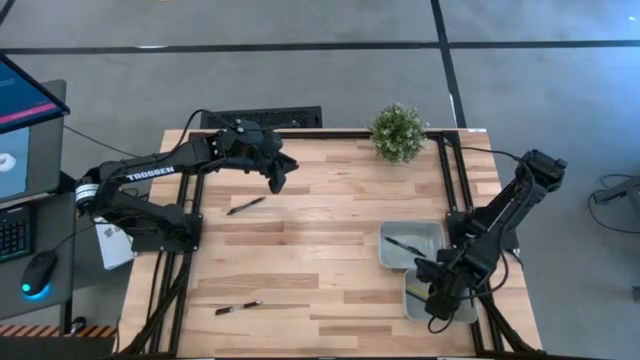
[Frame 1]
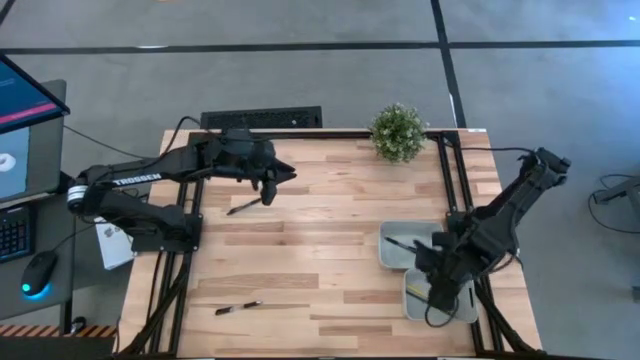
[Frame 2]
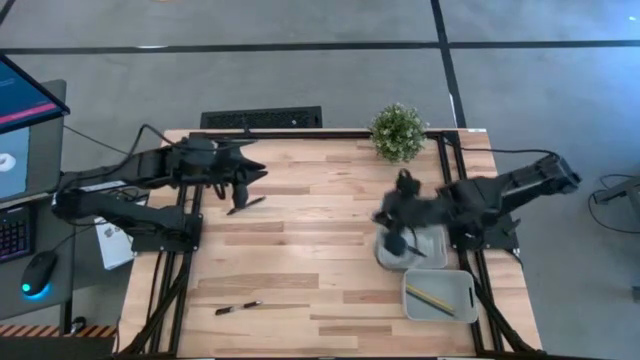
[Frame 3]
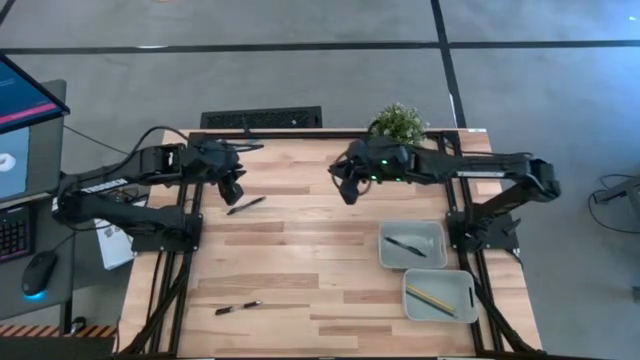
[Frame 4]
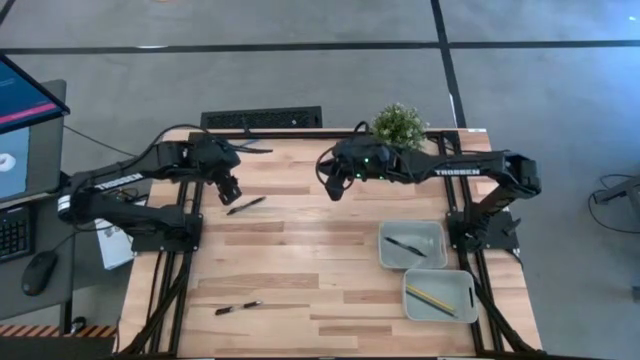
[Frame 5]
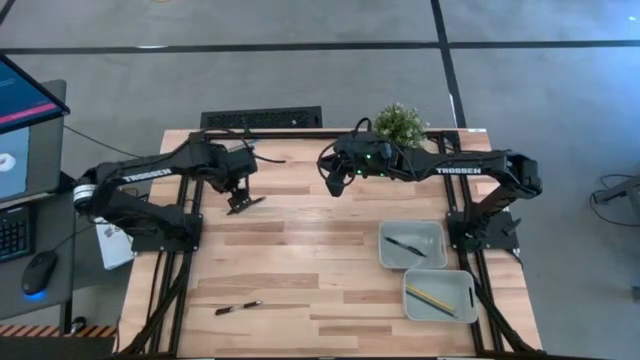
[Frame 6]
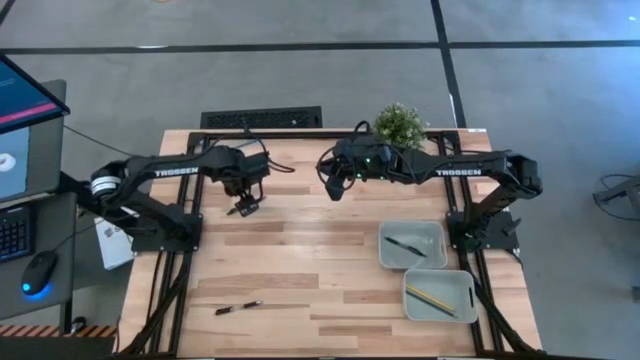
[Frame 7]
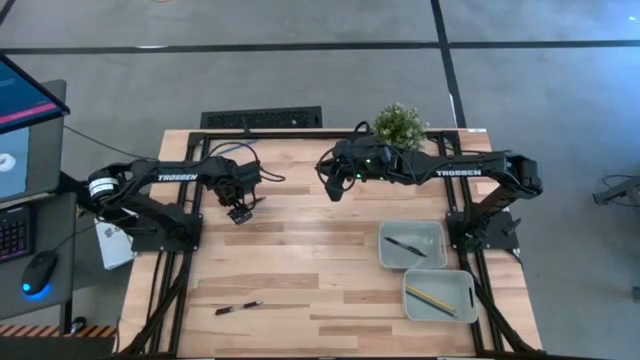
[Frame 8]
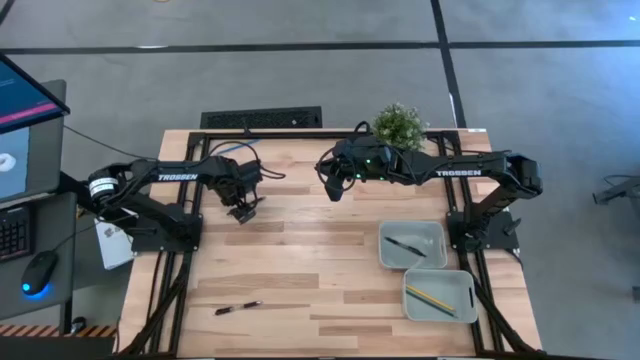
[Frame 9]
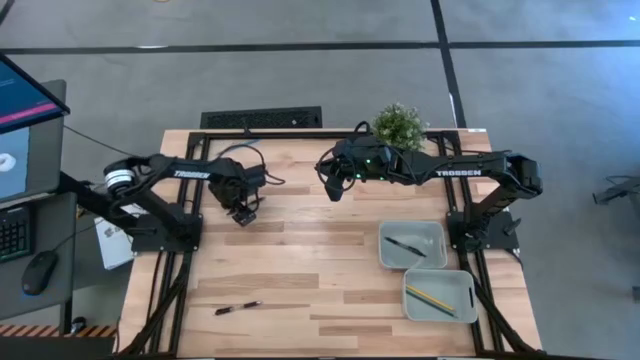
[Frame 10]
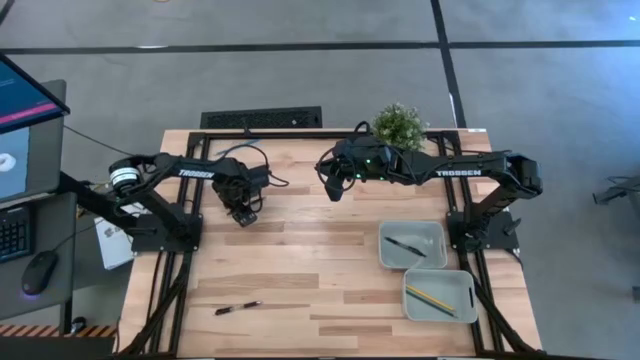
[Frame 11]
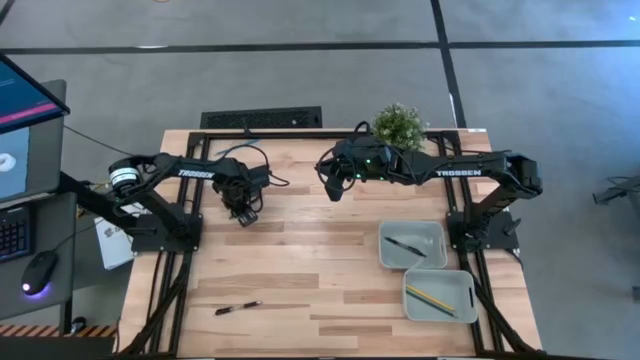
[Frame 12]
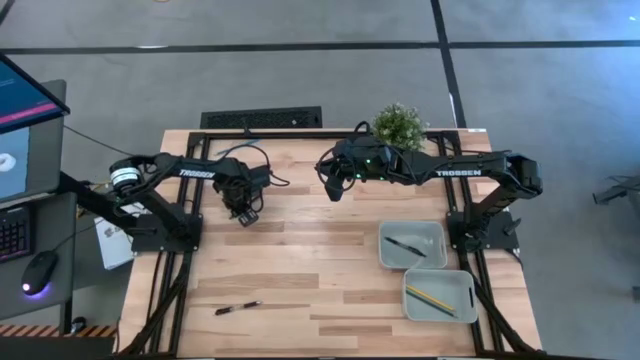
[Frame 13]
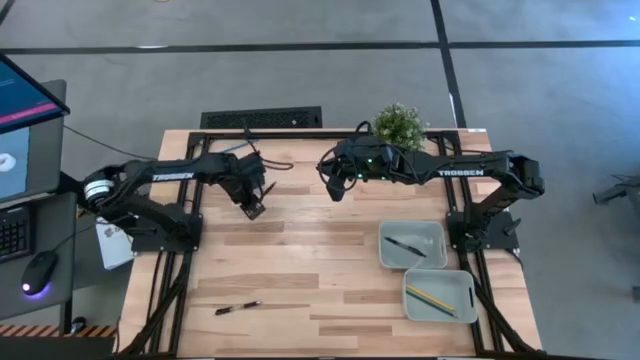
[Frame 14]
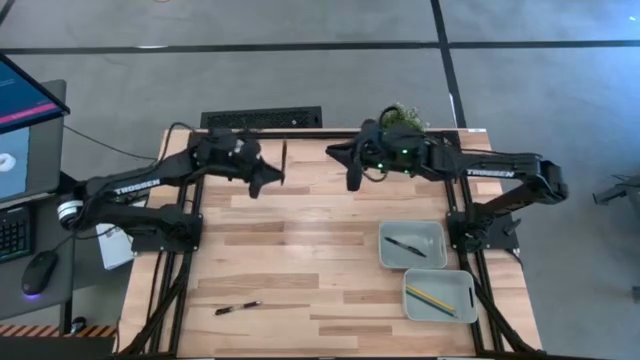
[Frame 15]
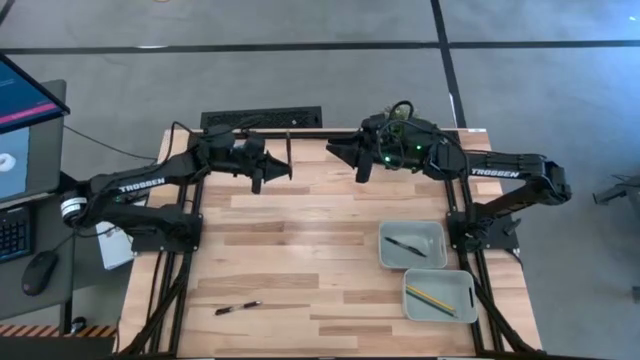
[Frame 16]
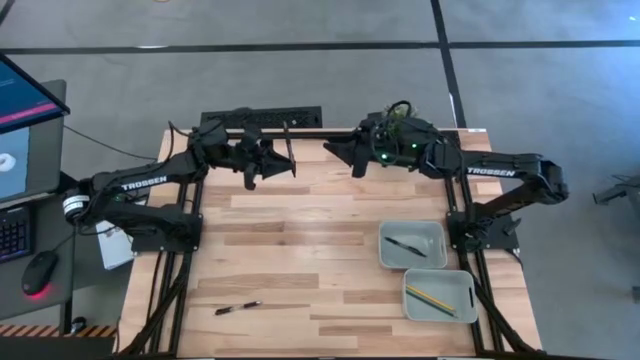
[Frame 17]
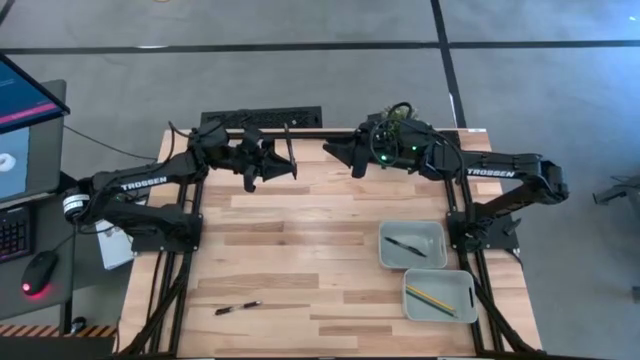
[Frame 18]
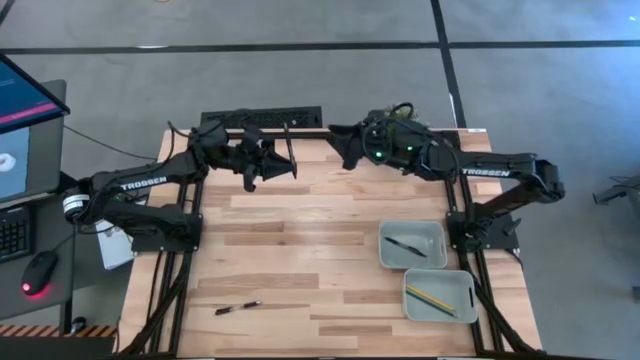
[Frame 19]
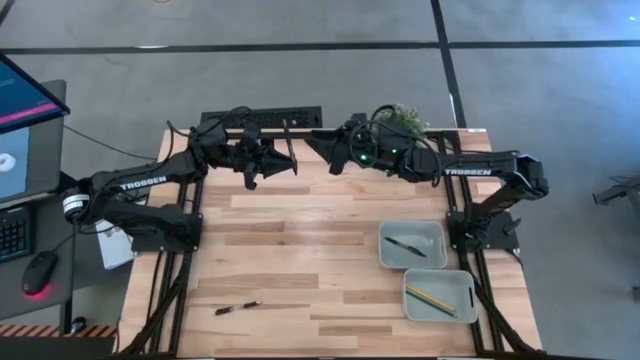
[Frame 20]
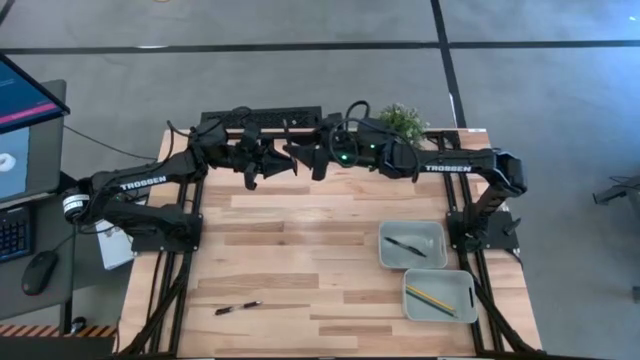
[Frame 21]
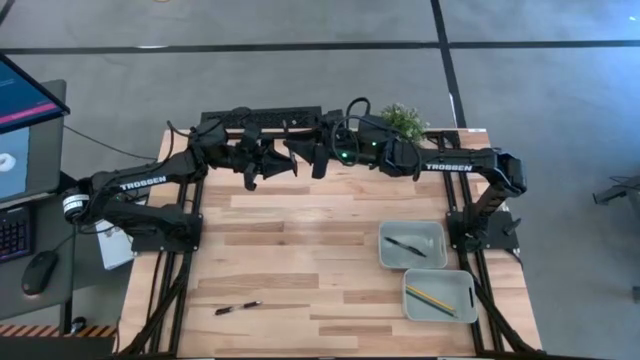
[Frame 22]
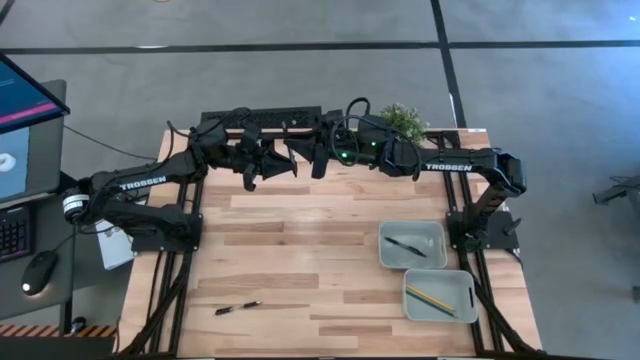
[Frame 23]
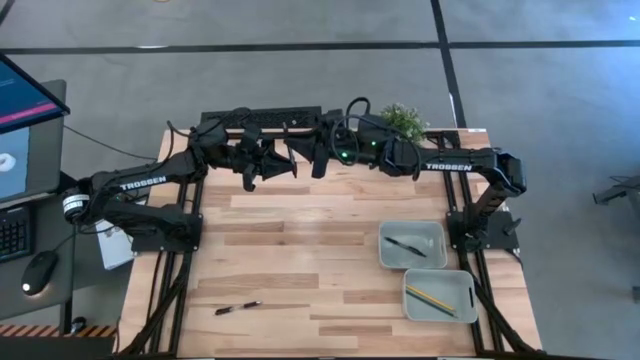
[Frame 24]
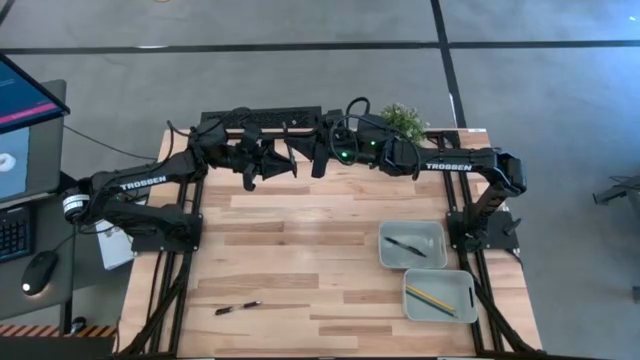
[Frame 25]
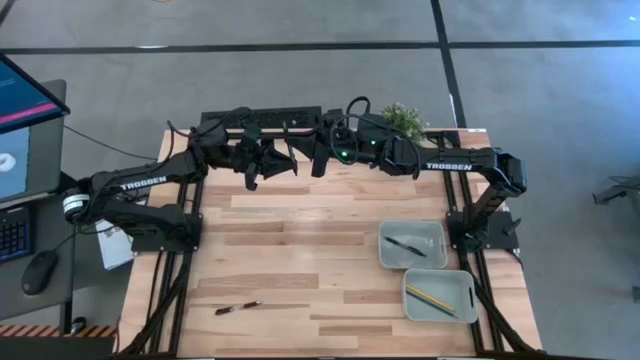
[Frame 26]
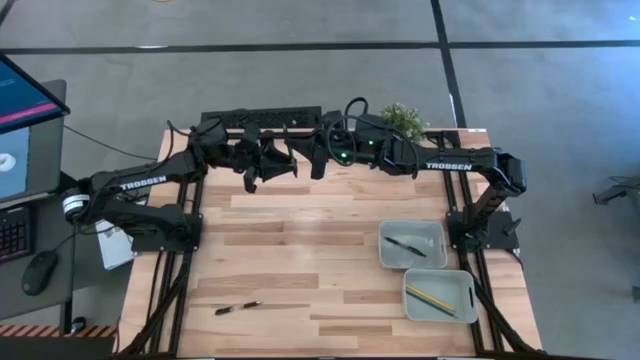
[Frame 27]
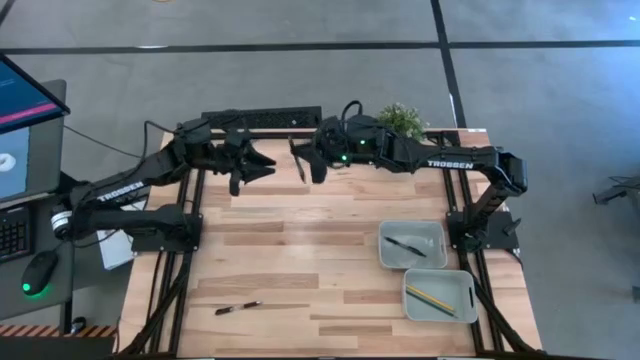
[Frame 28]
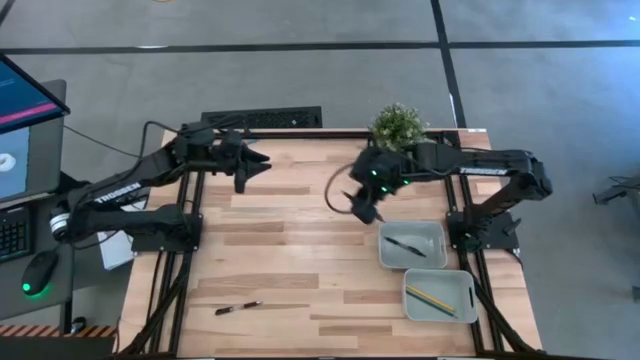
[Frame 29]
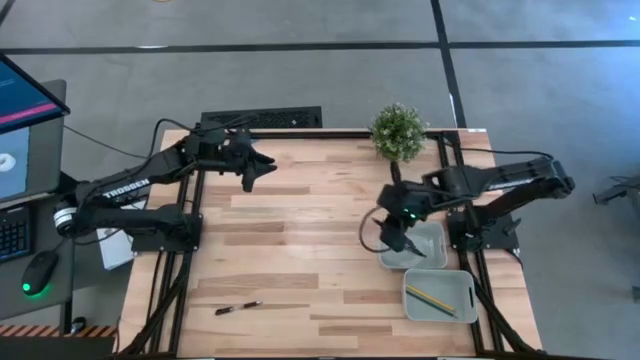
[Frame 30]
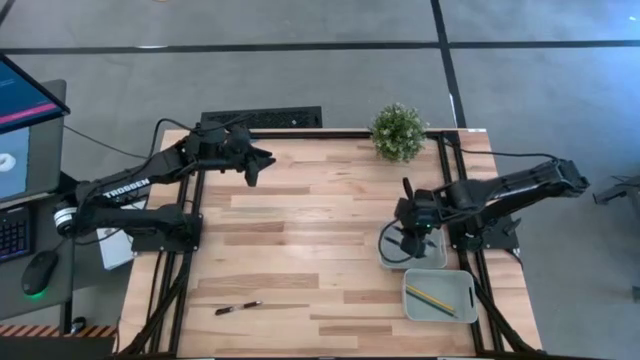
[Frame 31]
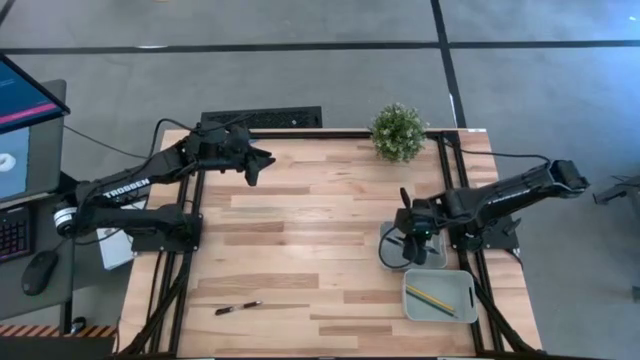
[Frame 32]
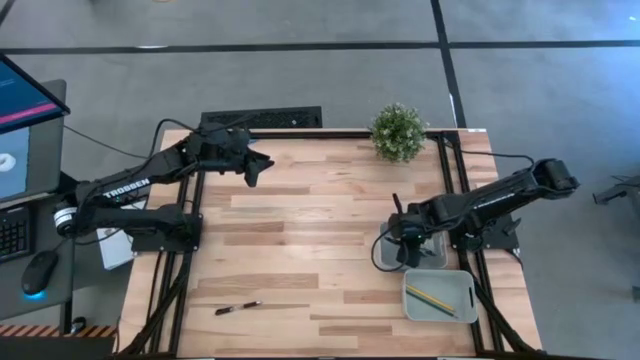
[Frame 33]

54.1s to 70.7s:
Task: Sort pens & pencils
Put the top black pen into the top gray bin

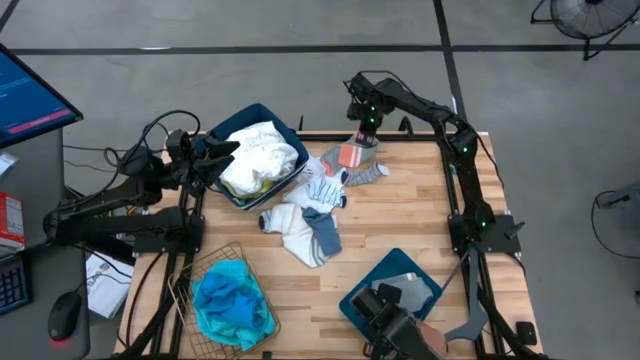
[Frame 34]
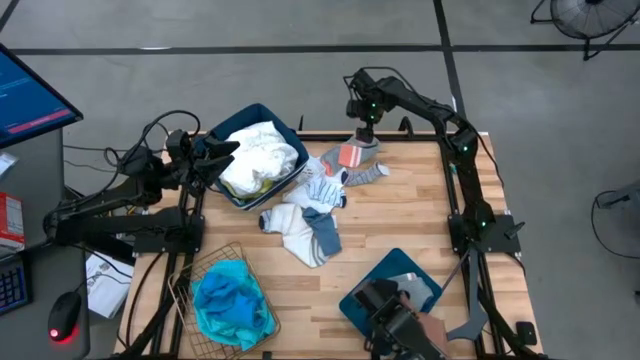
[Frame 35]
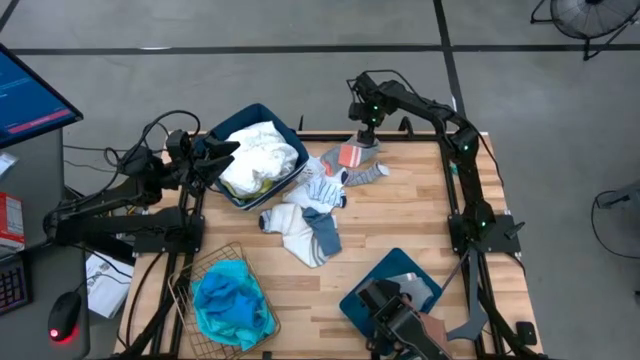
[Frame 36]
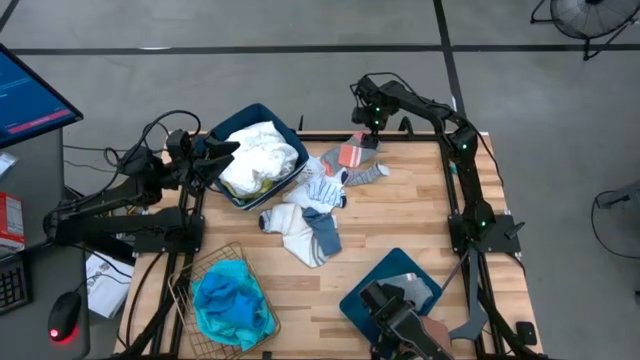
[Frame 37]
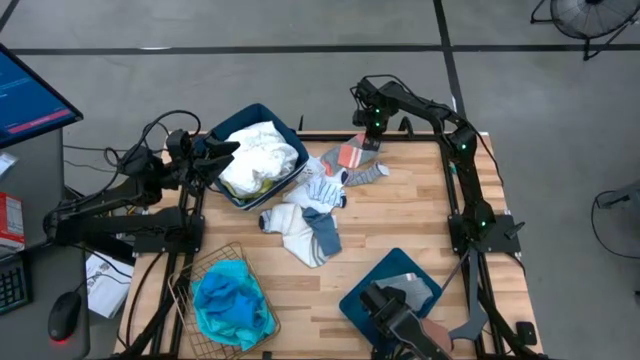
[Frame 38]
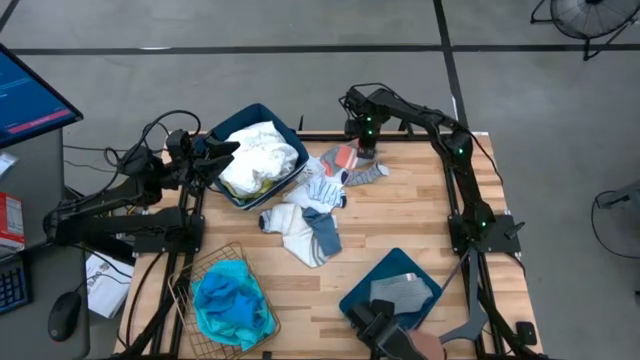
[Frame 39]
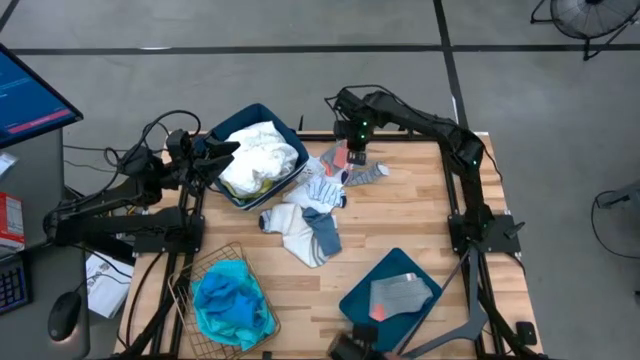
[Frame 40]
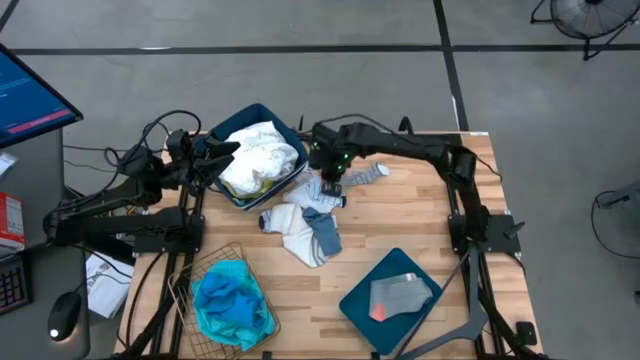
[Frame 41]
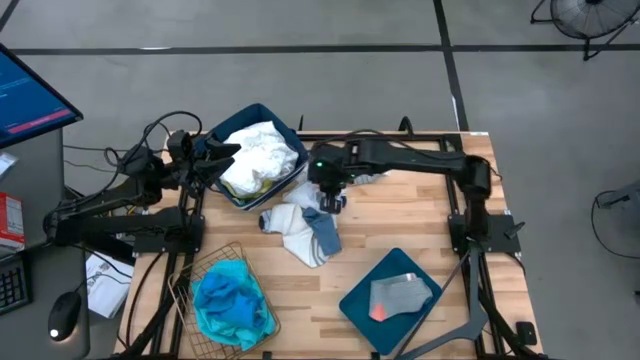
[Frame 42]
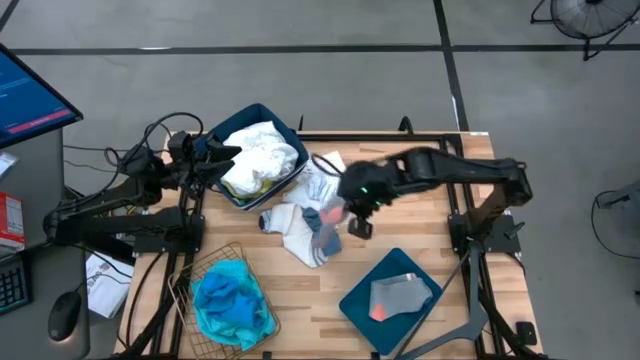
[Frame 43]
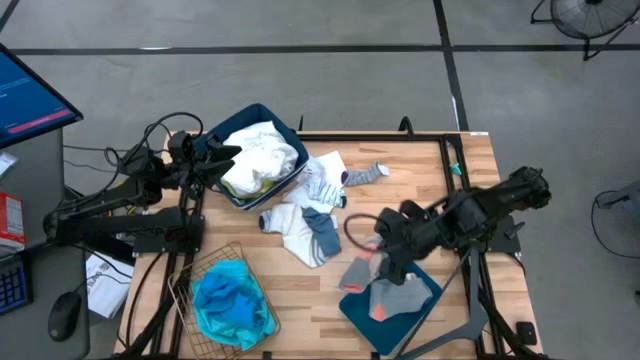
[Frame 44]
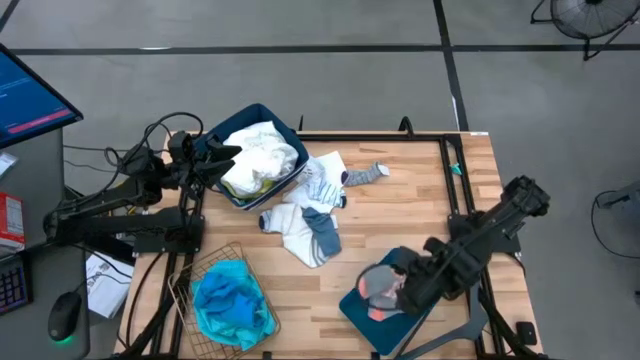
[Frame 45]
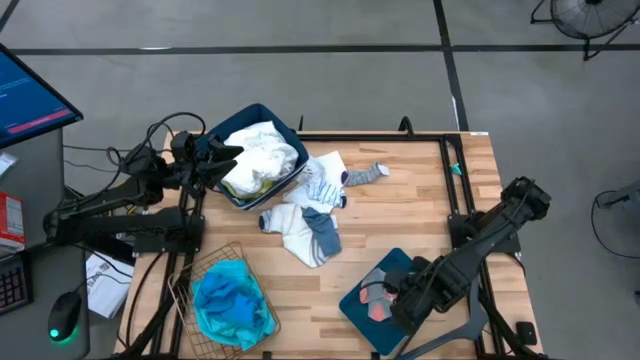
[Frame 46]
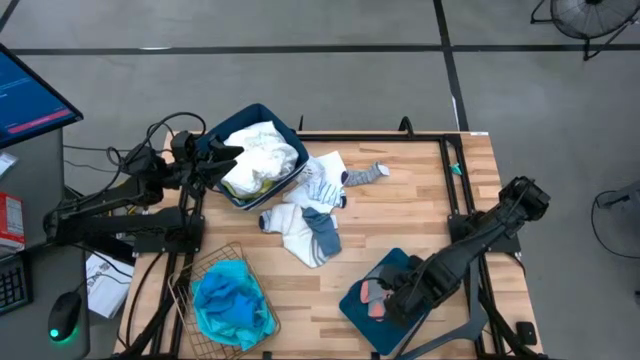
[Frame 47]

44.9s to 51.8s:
Task: Pick & Place Cloths
Put the gray sock into the blue bin
